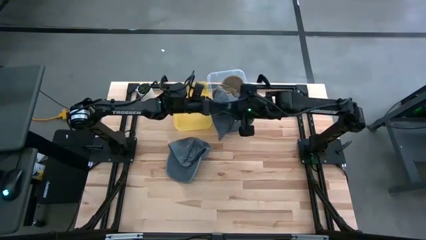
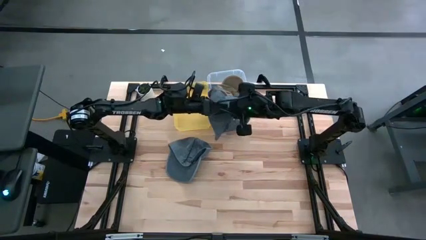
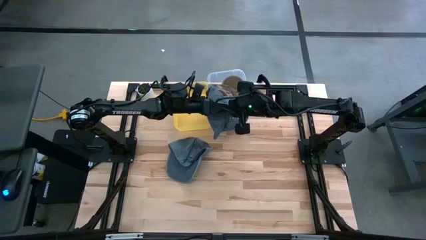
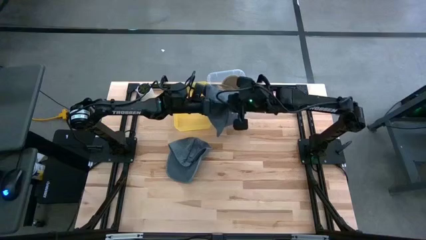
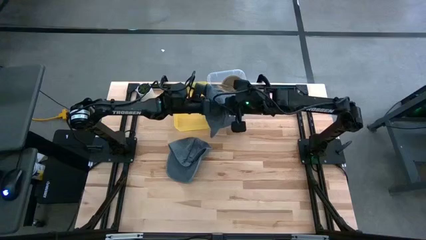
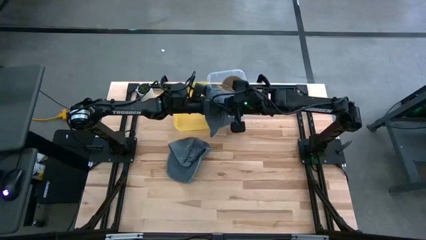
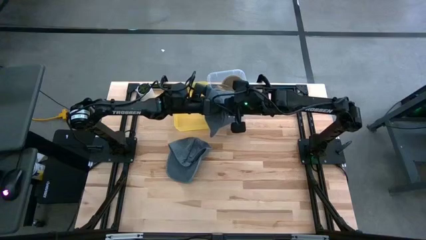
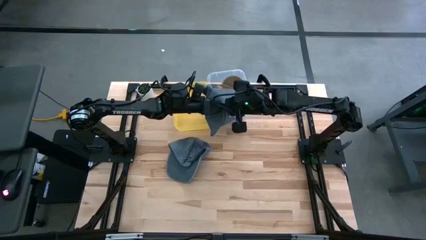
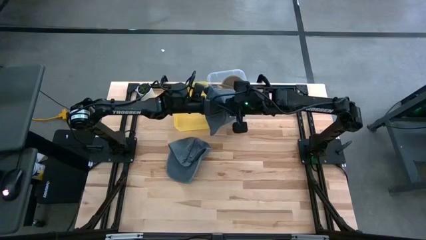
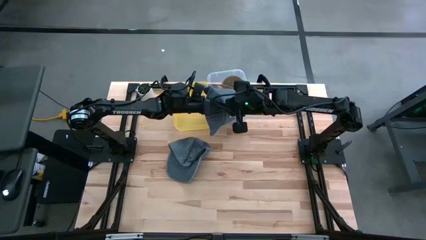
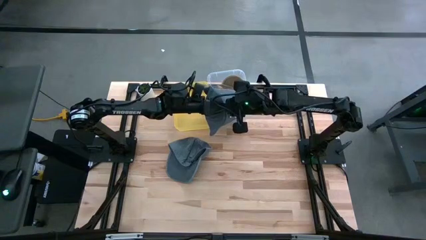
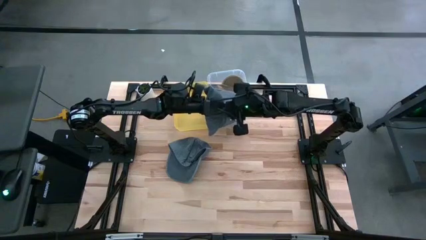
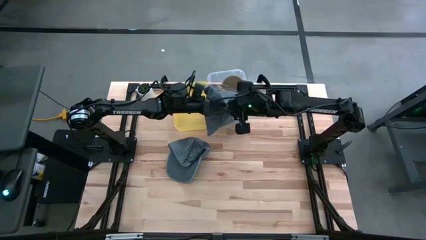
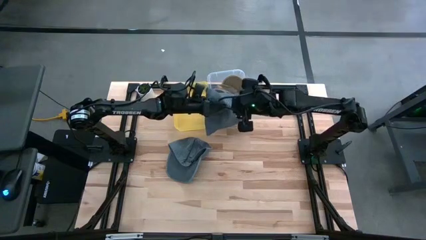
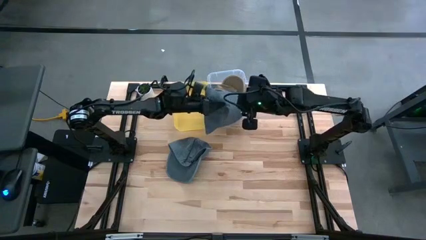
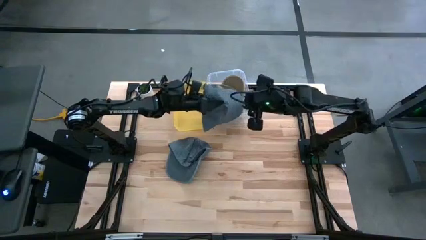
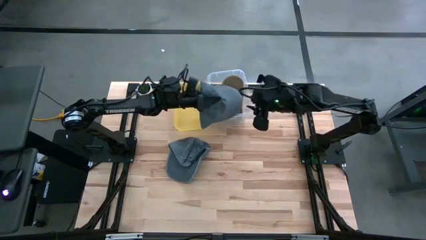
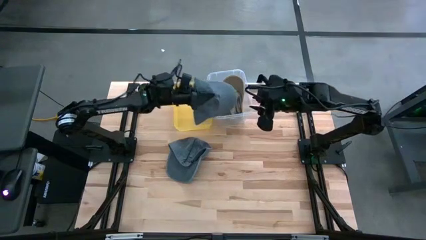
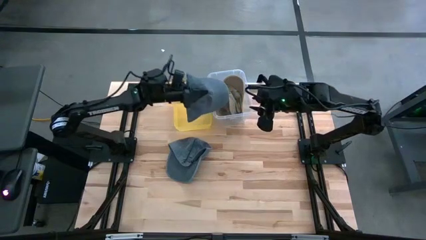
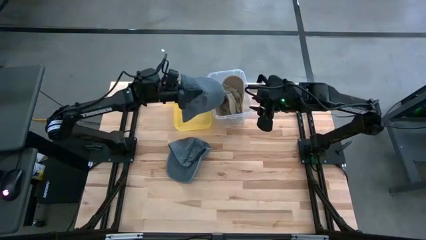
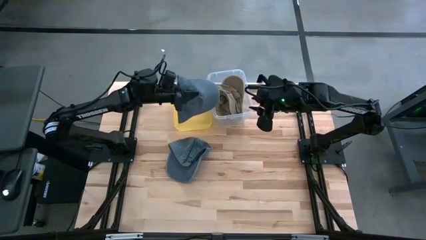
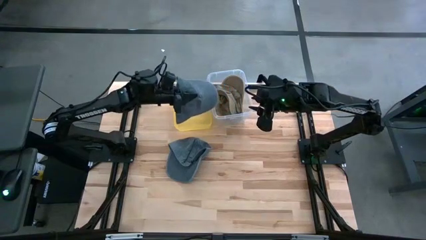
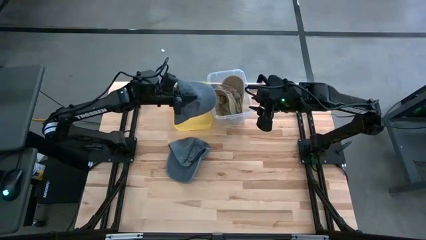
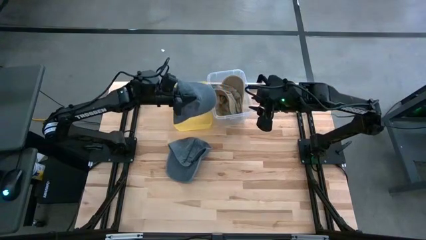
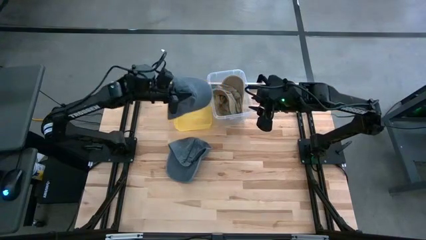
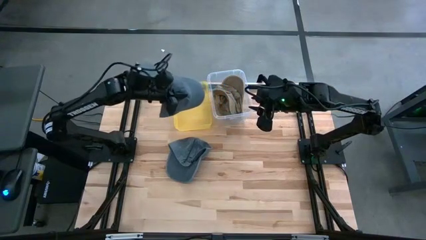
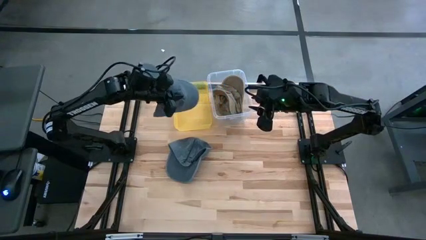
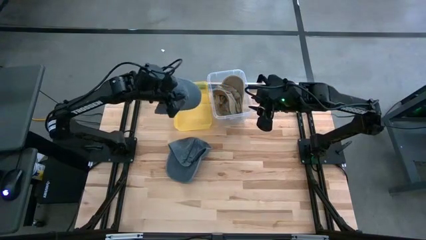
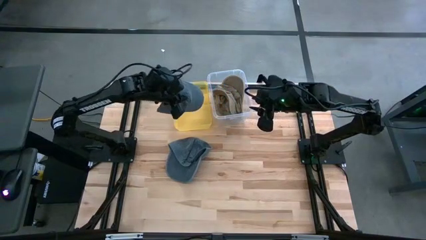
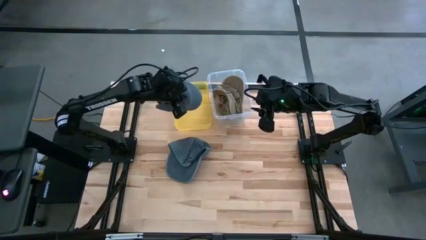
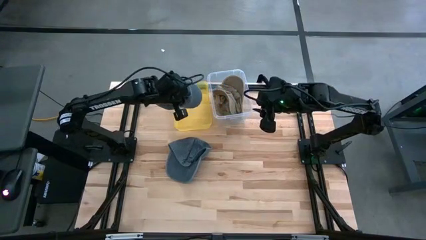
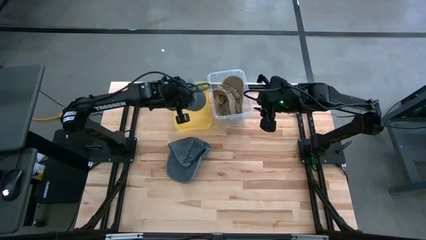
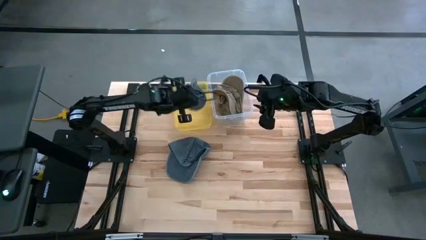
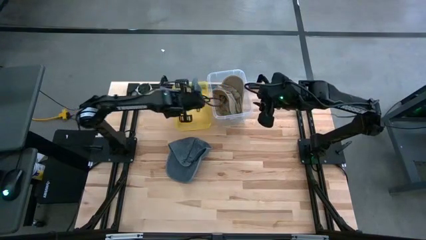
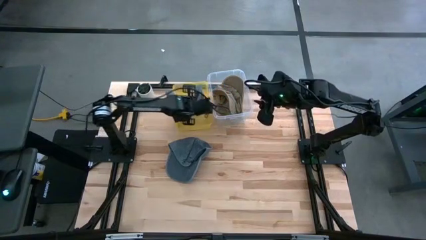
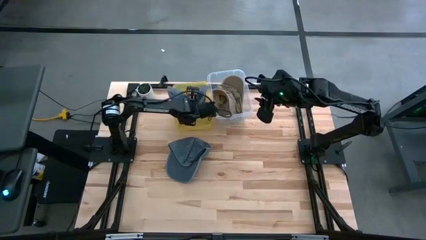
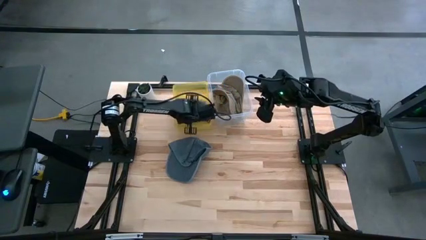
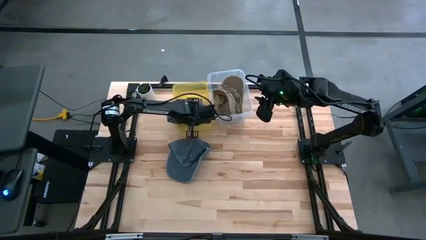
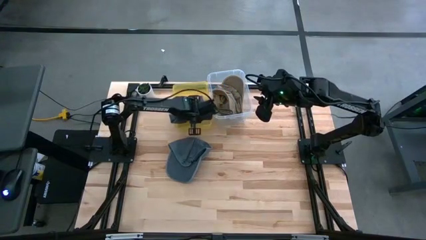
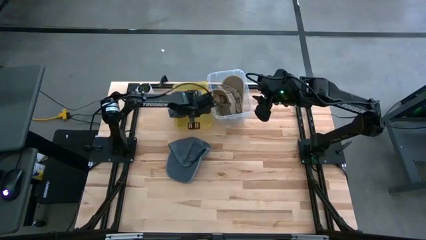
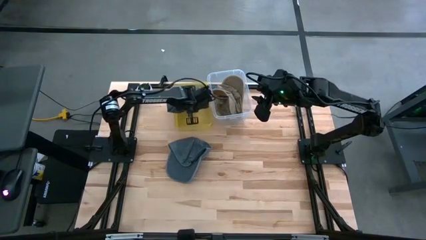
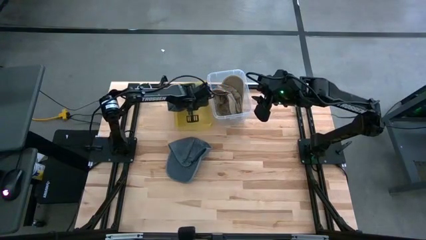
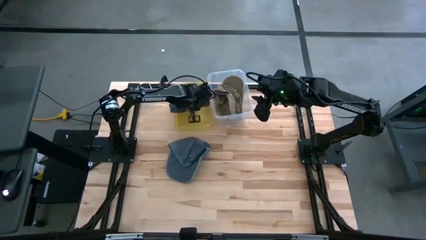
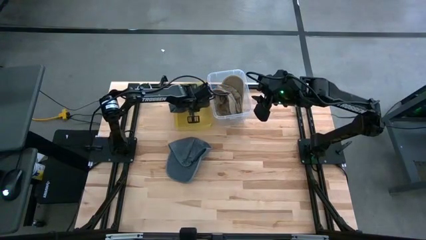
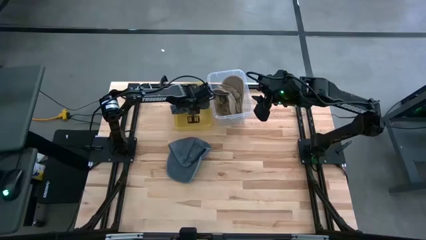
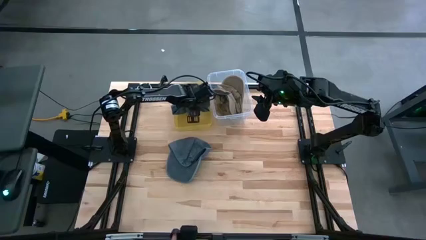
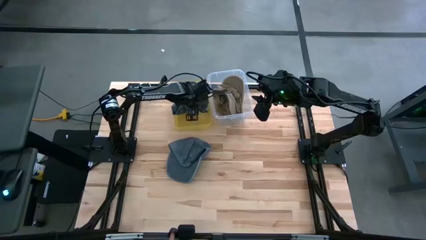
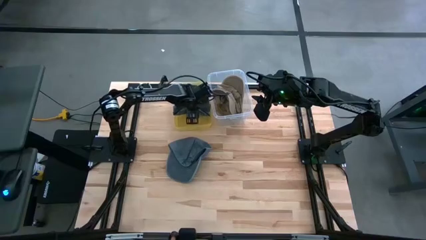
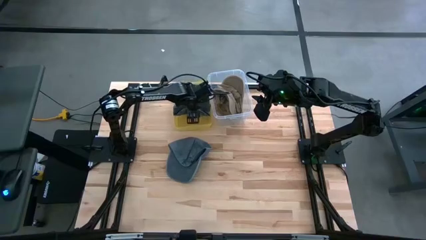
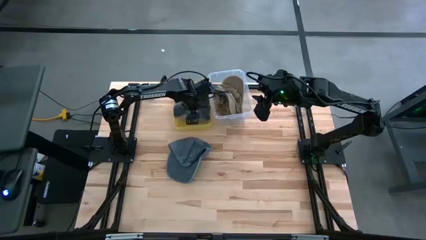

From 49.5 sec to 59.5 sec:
Task: Pick & Place hat
Put the right blue cap into the yellow bin

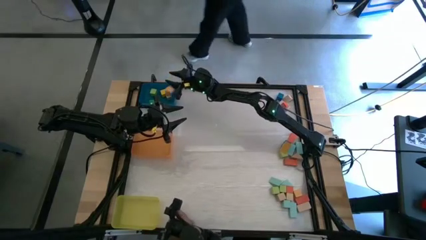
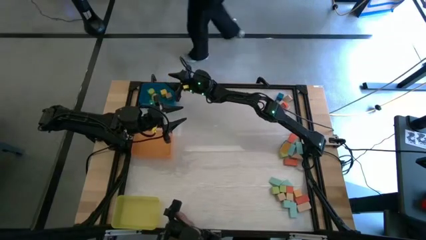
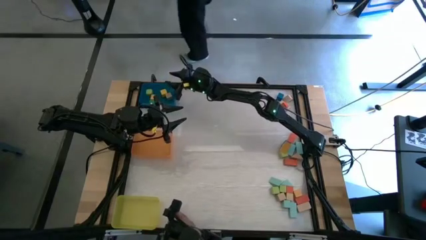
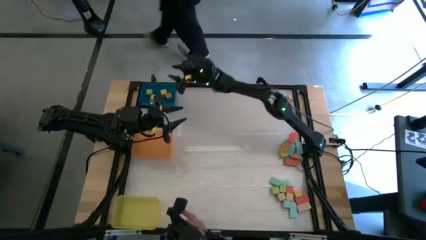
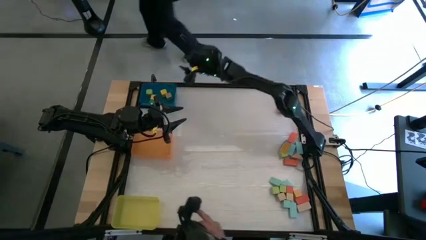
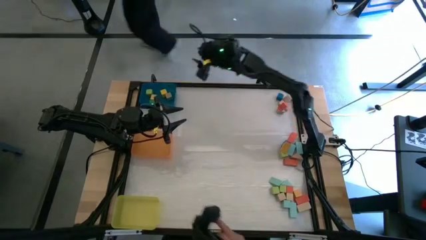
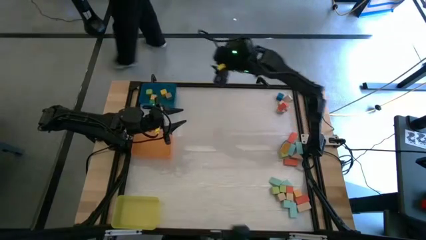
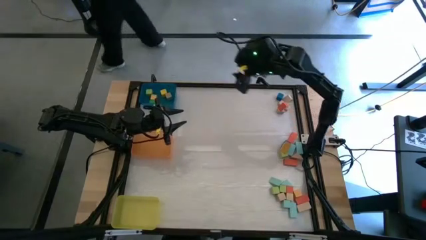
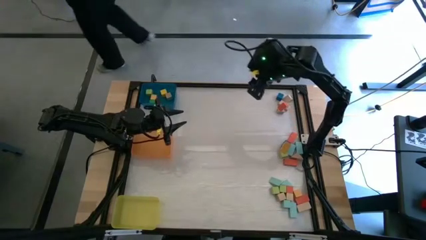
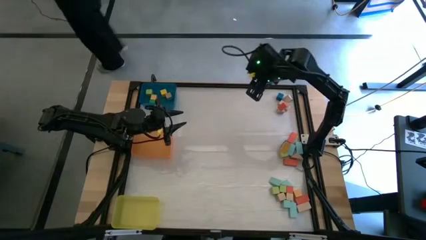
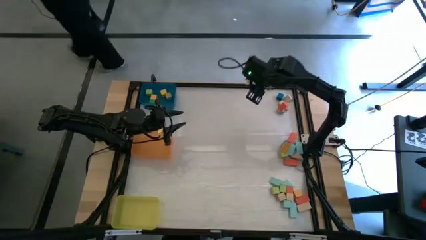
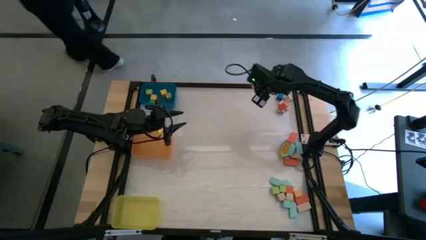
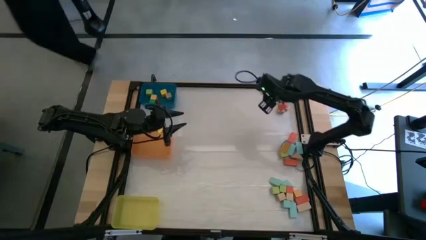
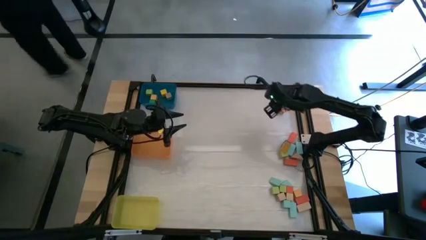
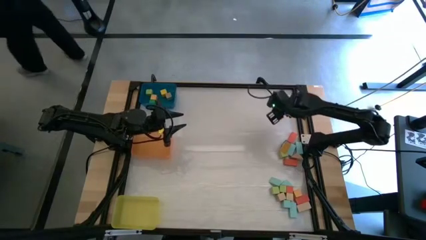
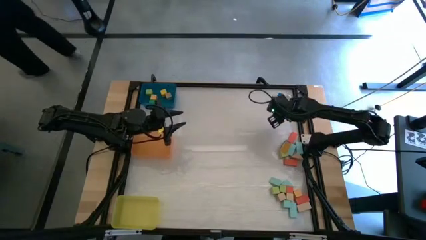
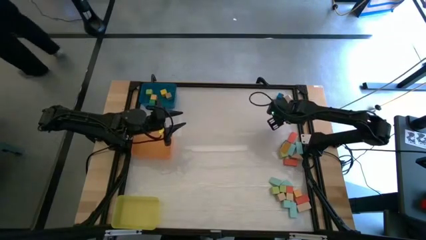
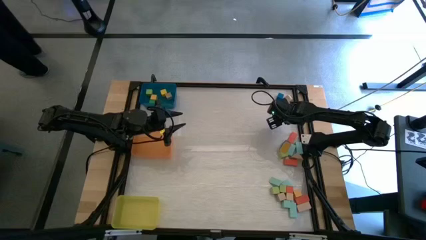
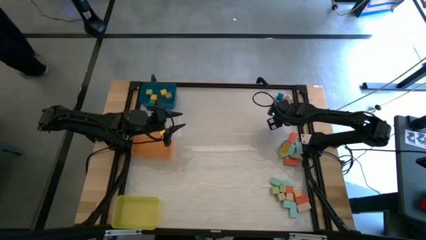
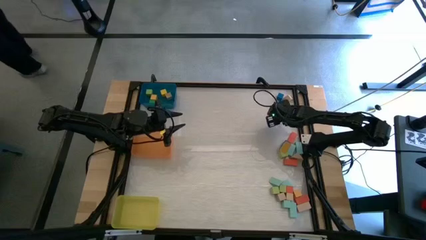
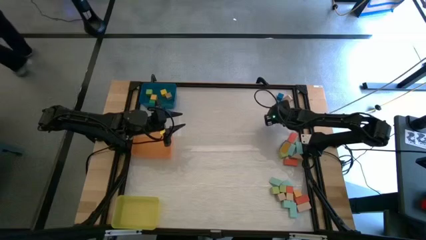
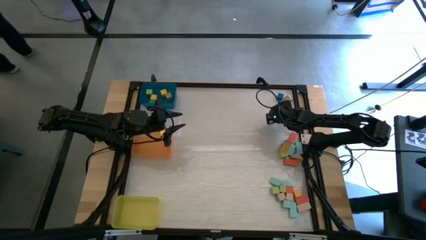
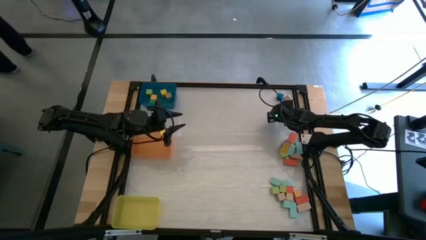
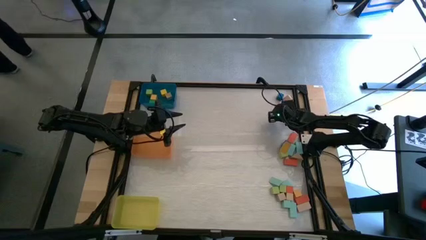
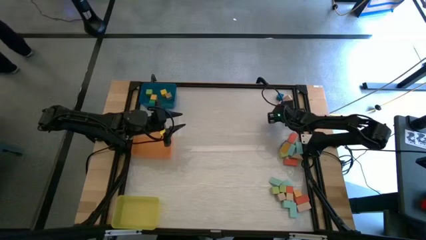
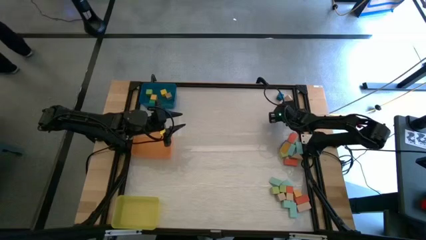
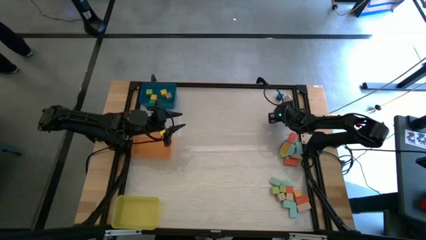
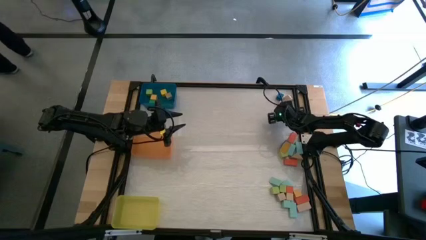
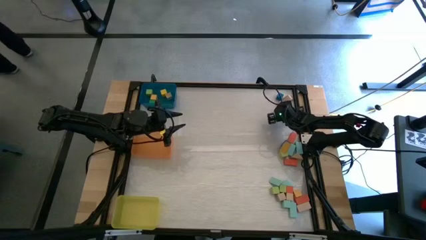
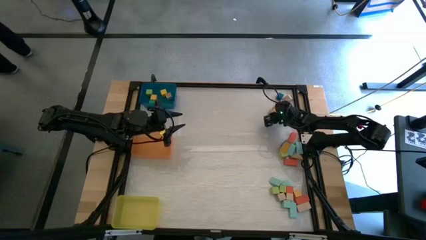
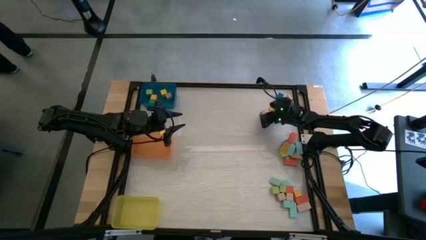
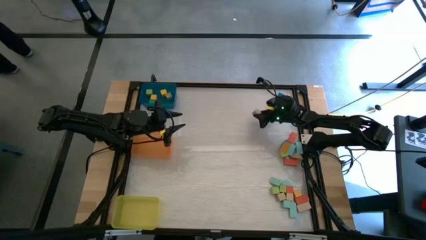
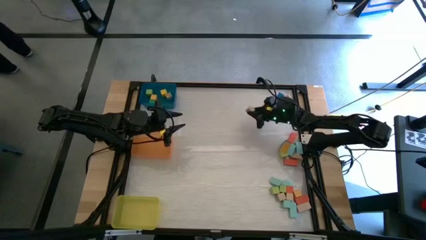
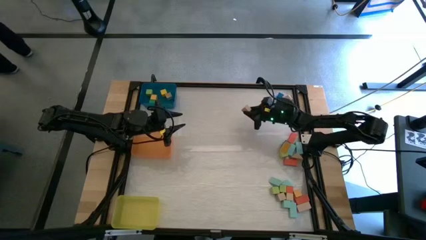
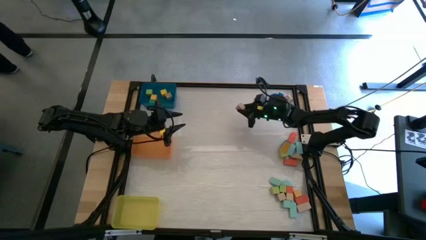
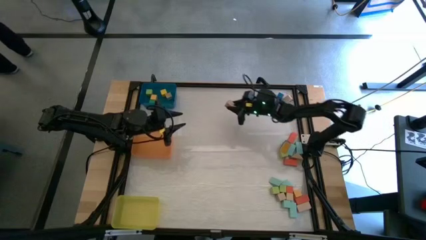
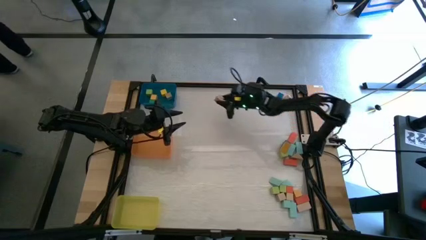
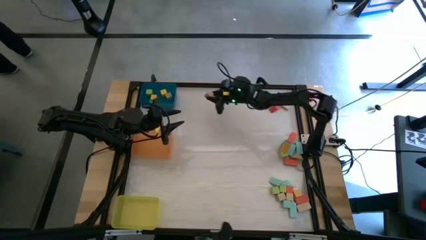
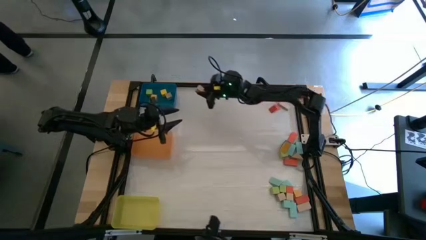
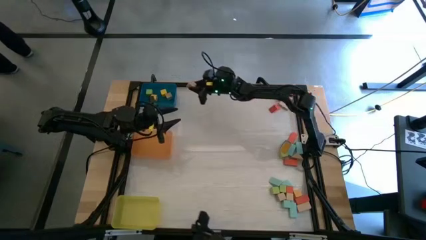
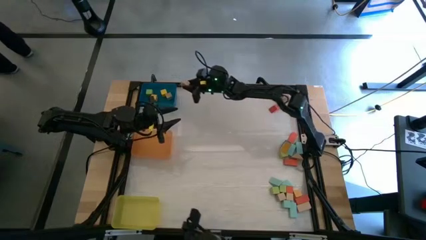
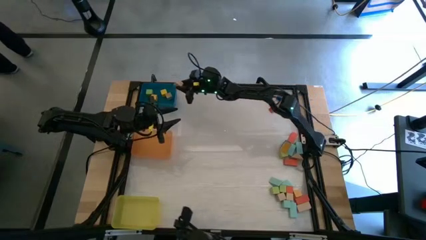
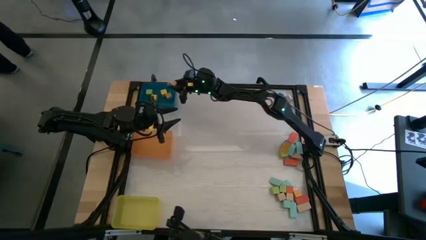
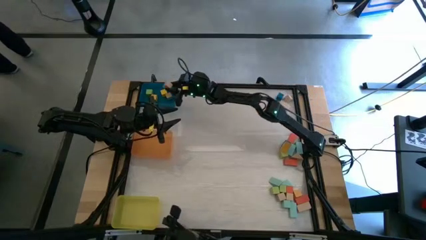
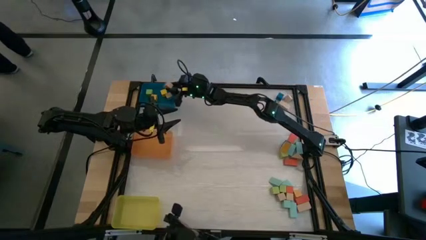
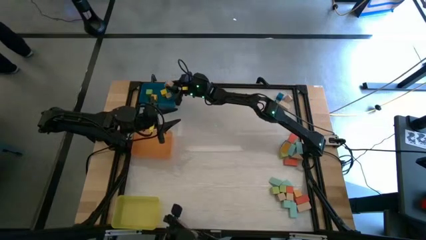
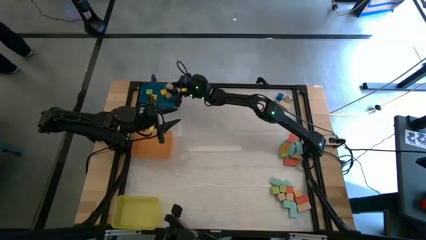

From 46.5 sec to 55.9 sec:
Task: Sort blocks by size
Put the light brown cube block into the blue bin
